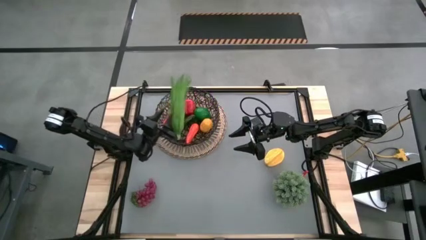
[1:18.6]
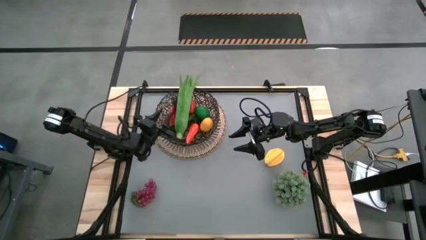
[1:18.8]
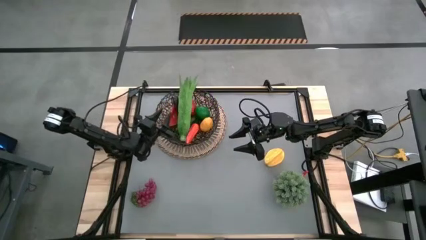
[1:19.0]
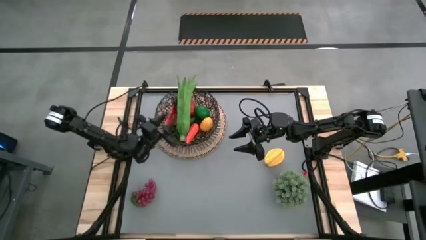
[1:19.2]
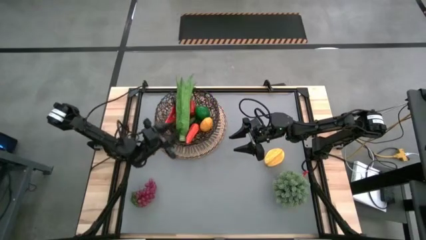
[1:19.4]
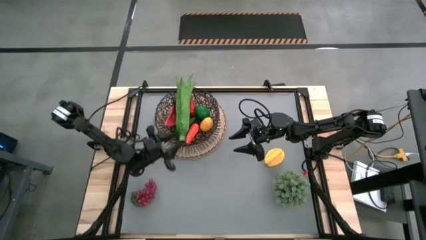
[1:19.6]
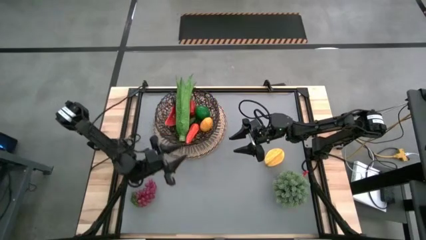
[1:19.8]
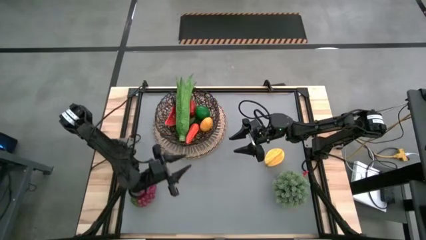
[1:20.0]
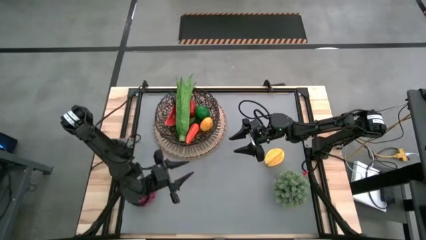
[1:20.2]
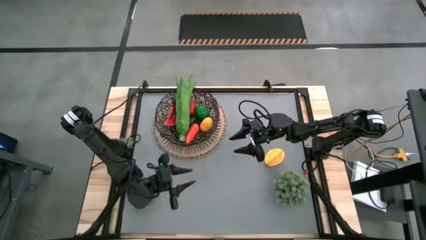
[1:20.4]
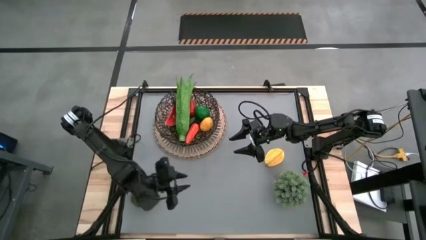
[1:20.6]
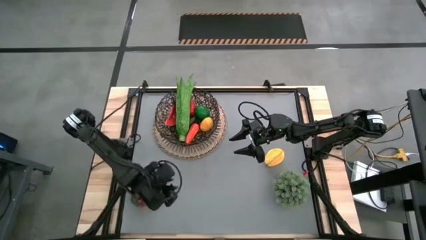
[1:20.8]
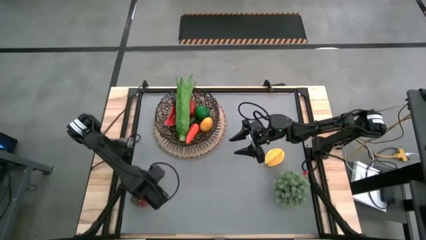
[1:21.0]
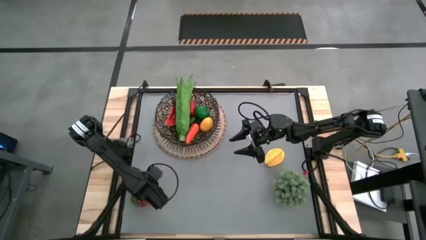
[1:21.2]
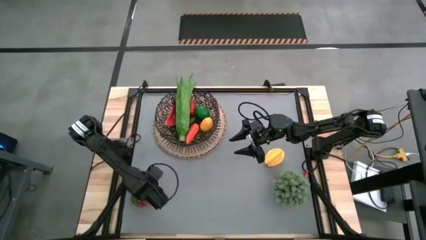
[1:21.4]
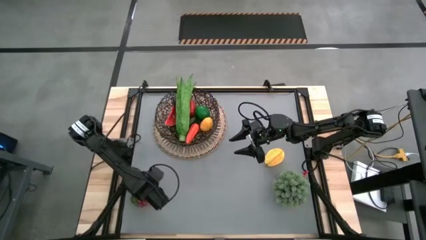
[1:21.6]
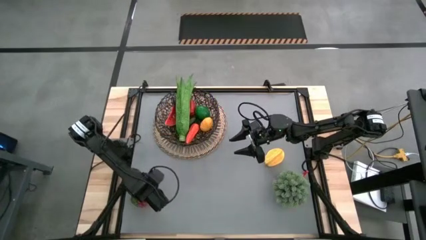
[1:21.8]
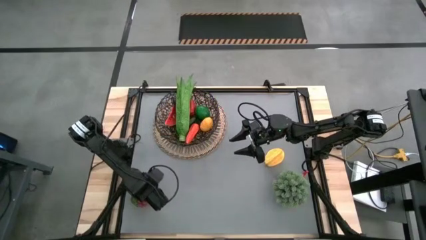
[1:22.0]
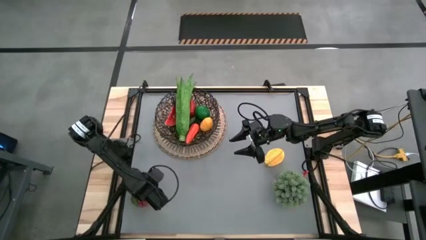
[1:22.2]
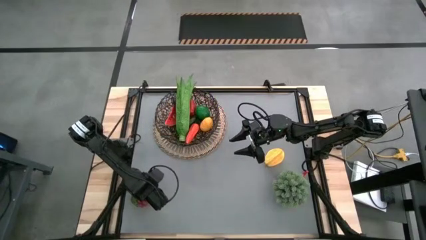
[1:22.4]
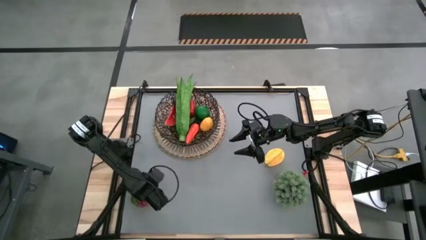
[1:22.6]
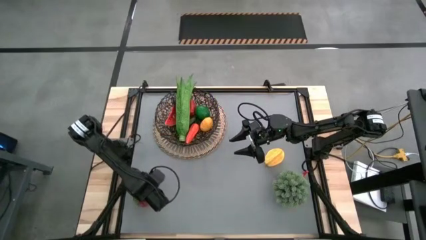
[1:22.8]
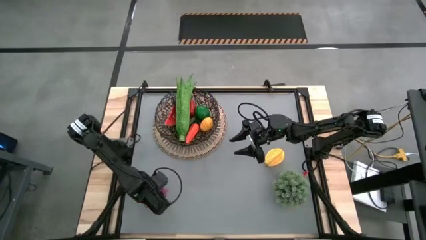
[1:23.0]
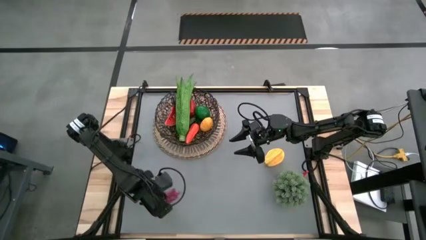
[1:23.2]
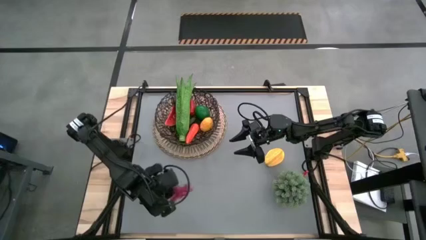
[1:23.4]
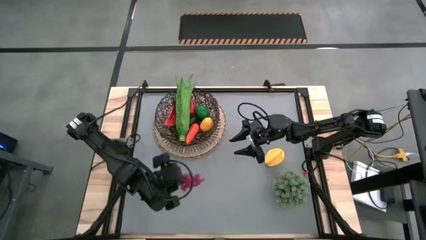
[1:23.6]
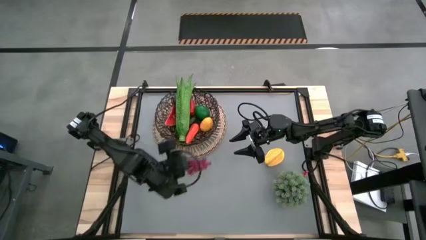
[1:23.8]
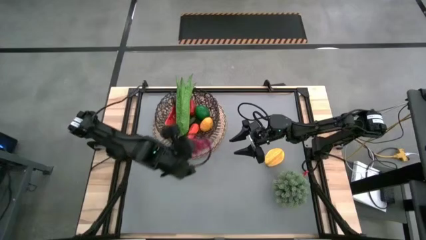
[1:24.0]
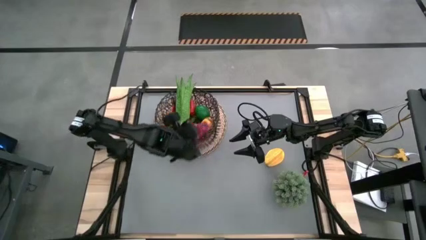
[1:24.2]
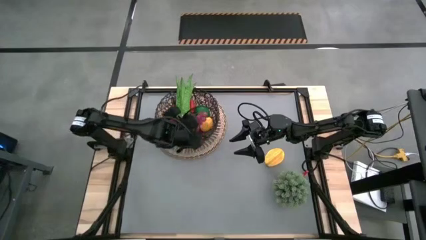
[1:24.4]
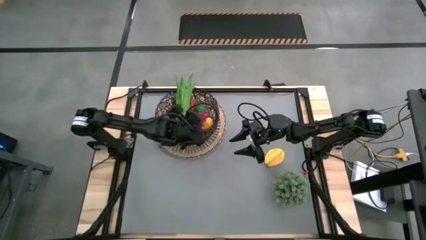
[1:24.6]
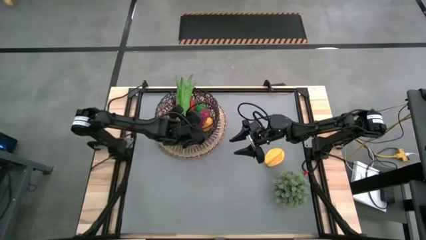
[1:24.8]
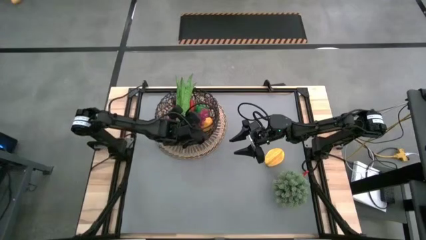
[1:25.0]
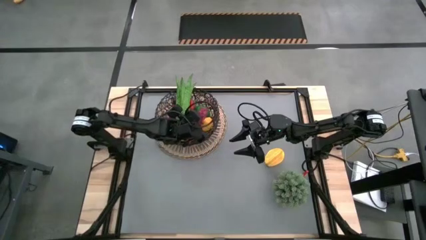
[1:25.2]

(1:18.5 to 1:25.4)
Task: Build produce basket
Put the red grapes into the black wire basket

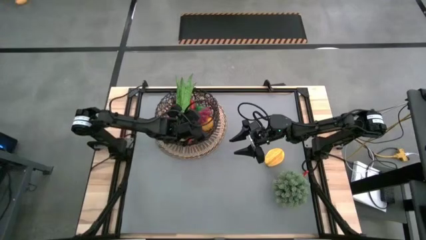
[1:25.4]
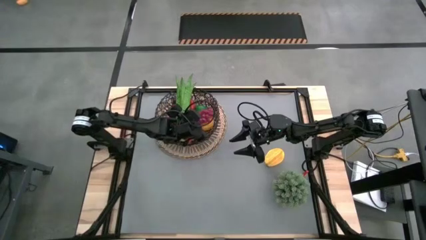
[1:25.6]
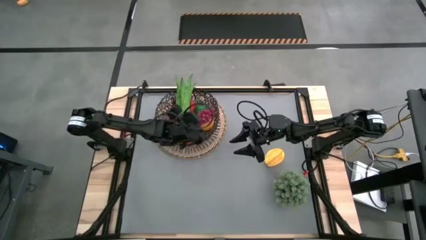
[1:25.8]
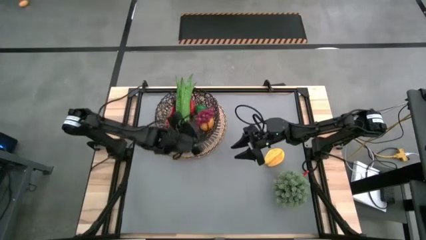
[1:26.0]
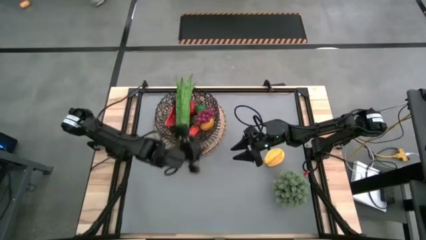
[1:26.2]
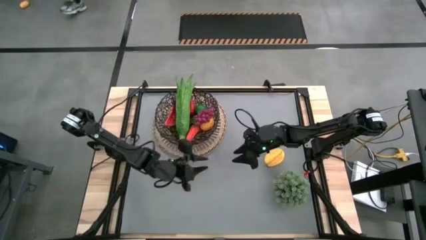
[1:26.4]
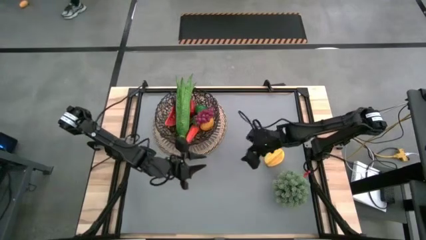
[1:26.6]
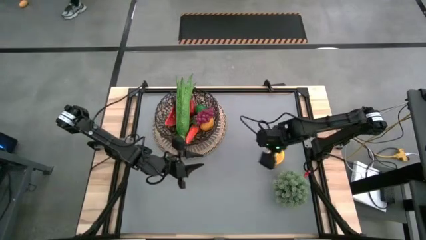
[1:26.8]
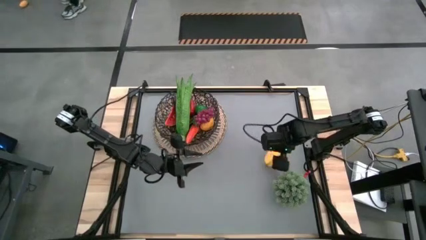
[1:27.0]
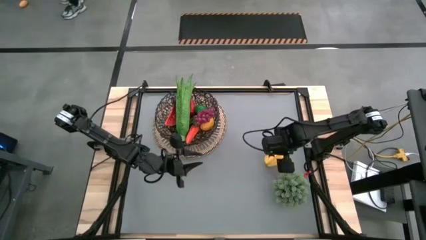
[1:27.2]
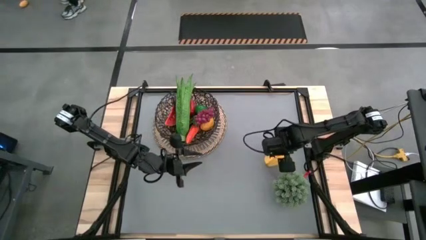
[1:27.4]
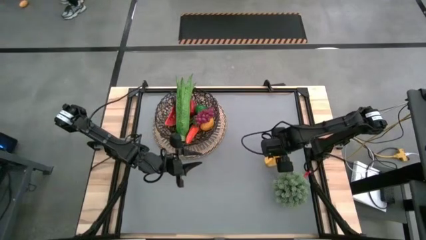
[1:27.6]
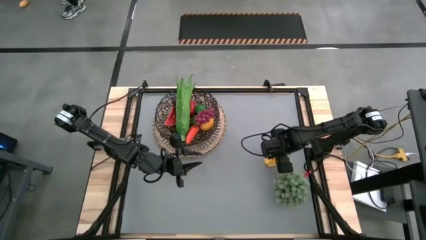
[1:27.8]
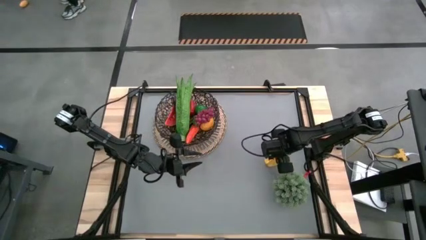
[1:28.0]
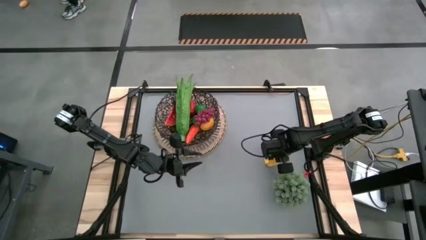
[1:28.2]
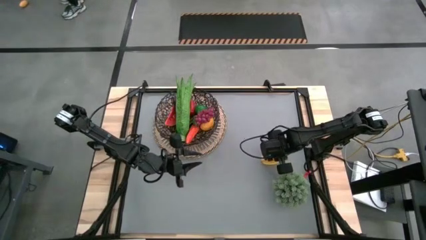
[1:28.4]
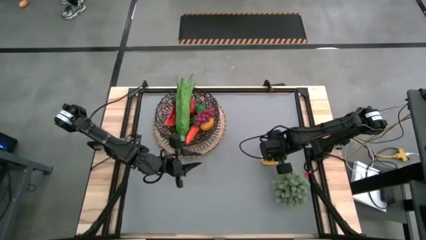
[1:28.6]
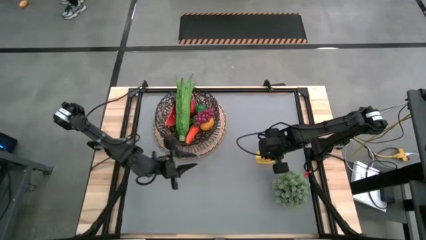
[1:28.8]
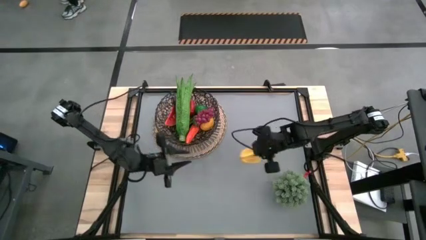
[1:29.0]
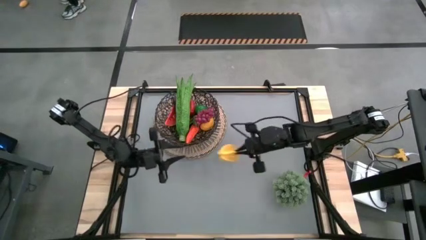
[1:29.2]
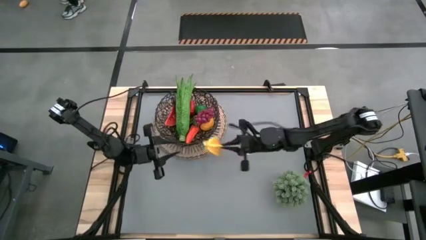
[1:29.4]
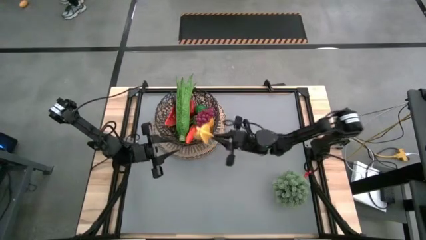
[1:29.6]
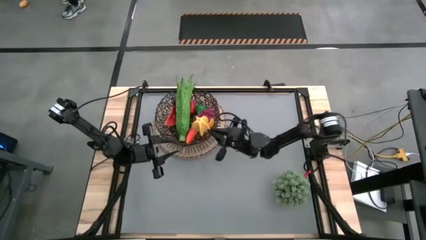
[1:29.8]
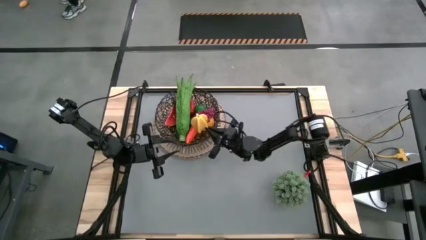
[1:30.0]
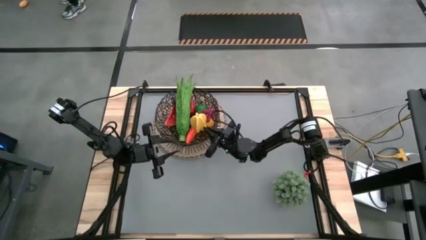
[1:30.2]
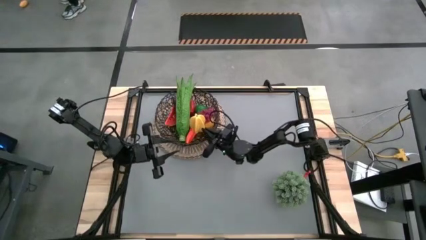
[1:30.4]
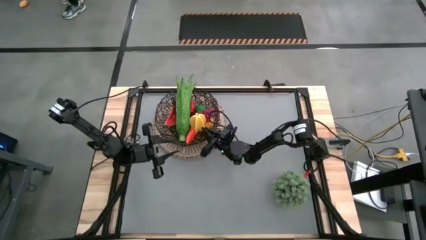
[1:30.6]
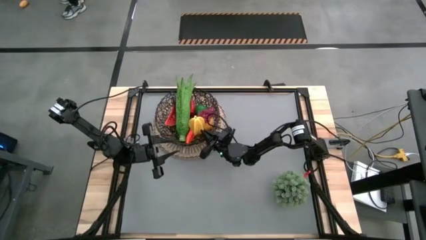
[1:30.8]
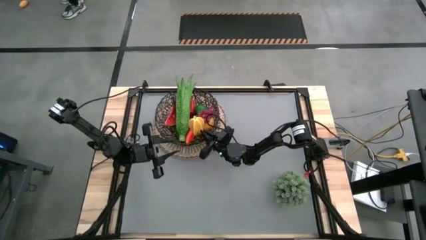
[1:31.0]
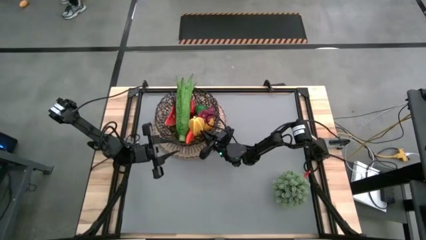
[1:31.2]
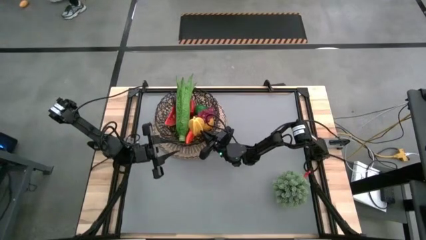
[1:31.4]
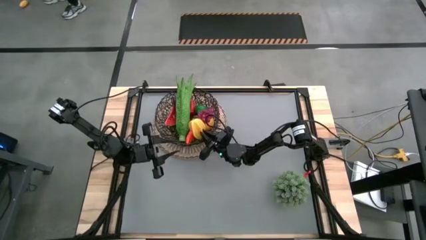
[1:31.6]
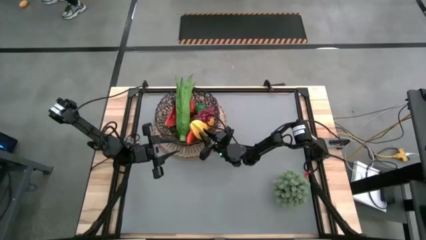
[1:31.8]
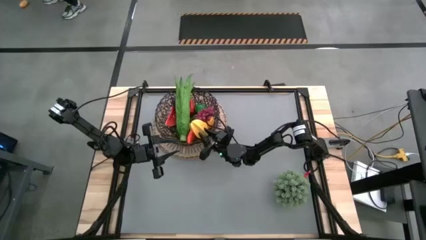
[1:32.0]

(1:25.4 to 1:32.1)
Put the yellow starfruit into the black wire basket

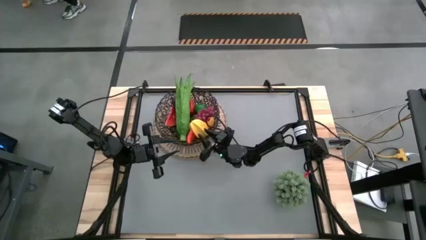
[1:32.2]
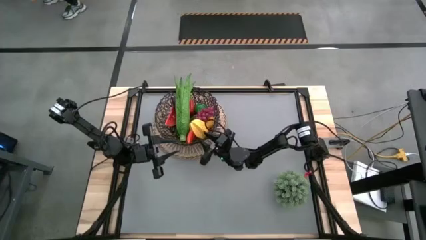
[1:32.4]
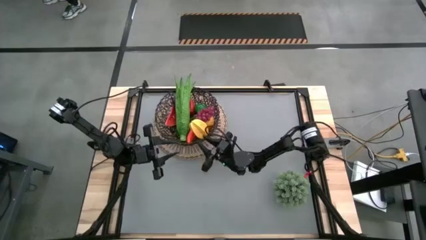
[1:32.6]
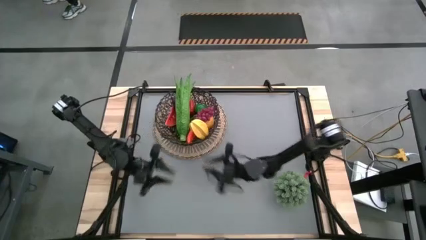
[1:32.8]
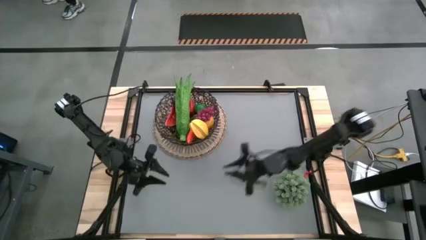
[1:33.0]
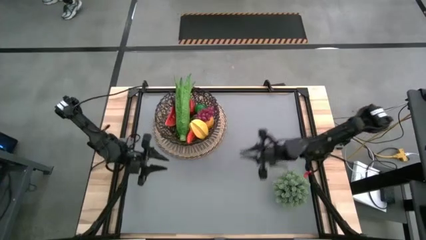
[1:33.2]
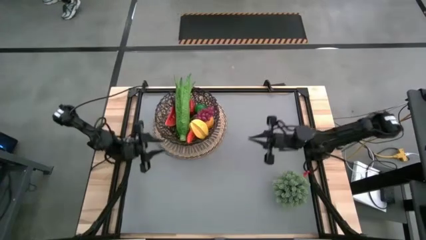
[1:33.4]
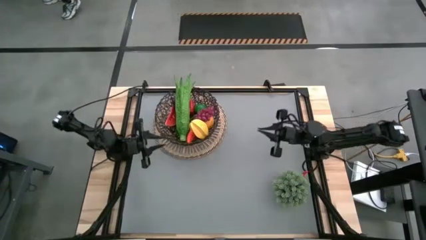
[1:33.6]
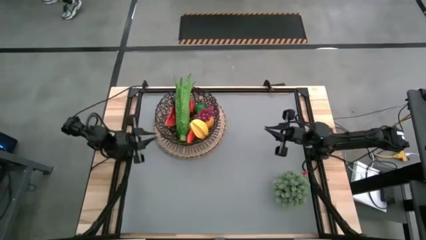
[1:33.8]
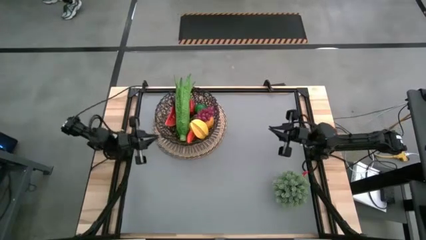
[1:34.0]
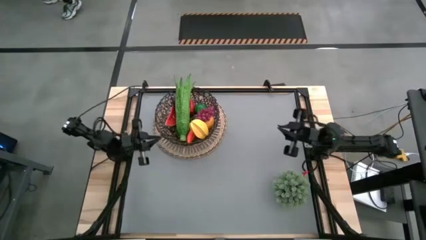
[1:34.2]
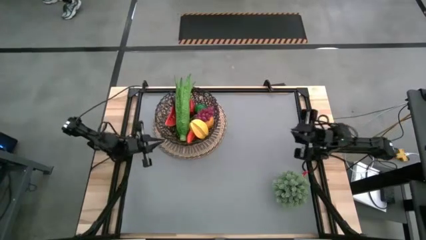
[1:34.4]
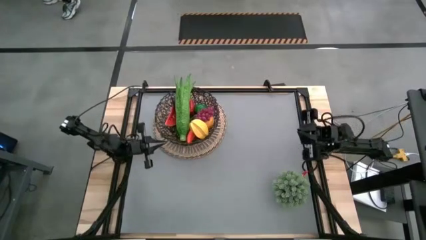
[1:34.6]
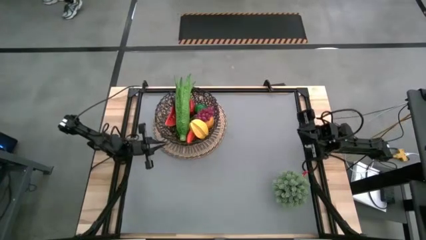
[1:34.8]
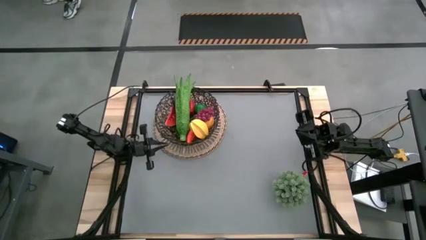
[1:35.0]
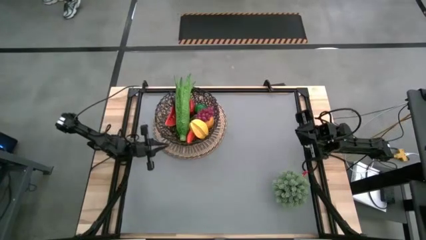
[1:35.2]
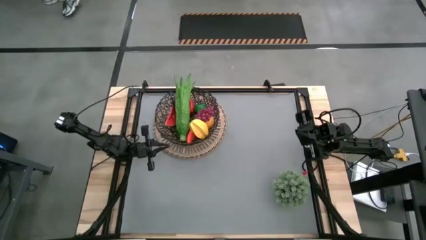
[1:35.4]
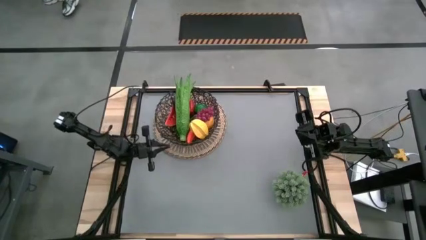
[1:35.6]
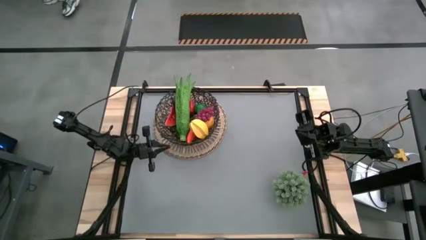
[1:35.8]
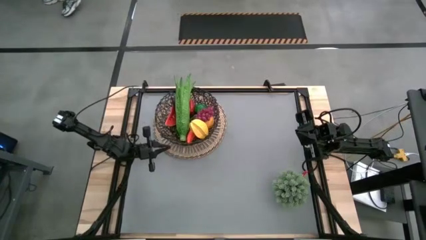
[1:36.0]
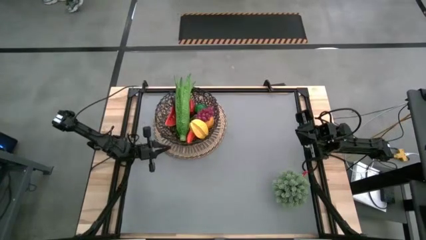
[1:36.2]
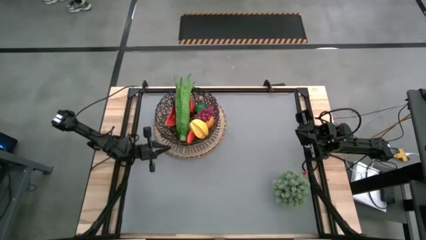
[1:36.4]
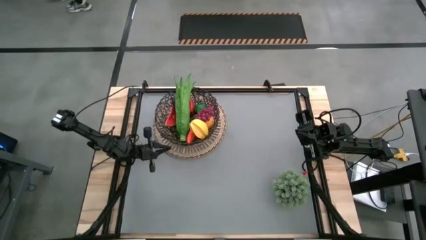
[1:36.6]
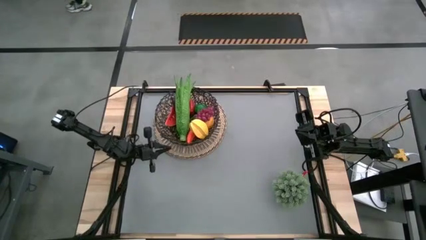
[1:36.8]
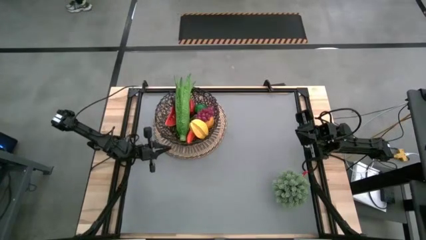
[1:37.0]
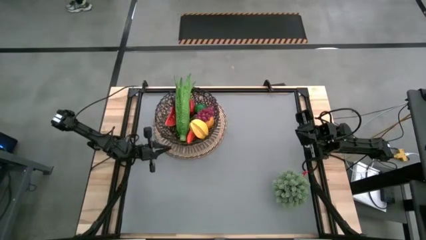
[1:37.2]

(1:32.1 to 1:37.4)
Return to home position
